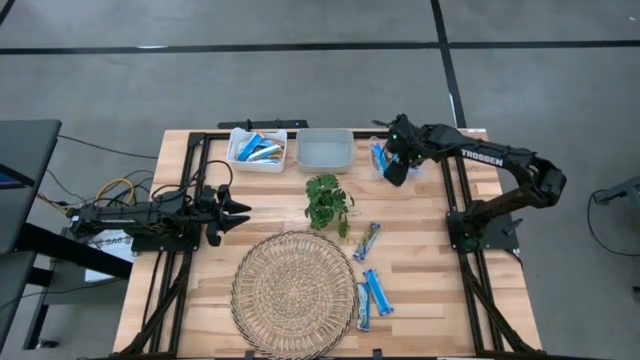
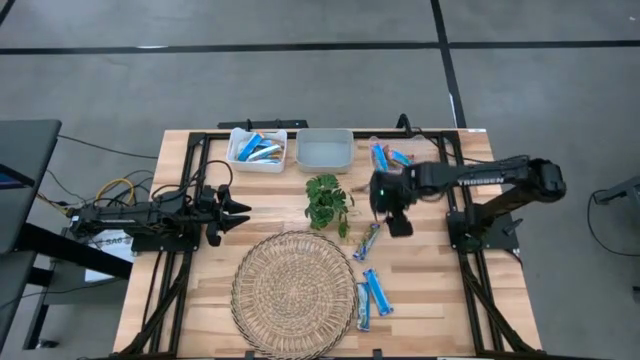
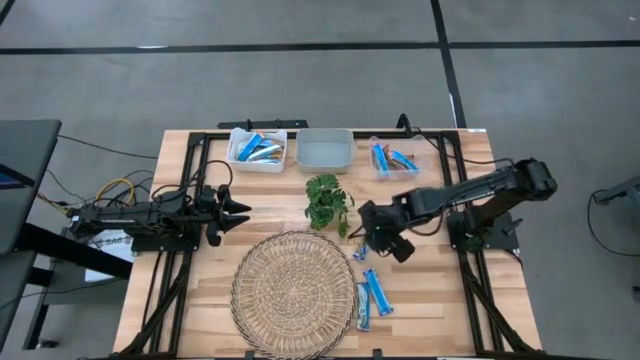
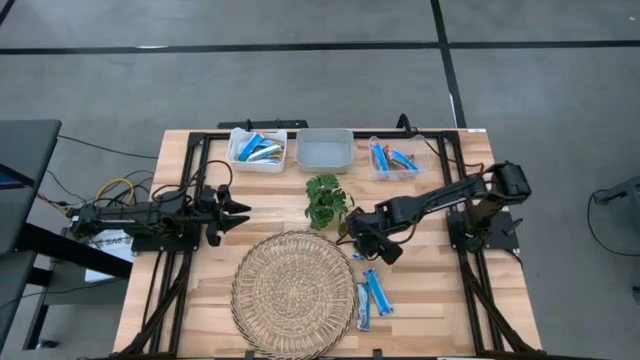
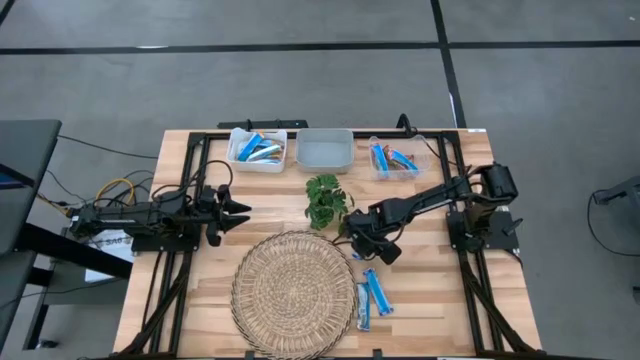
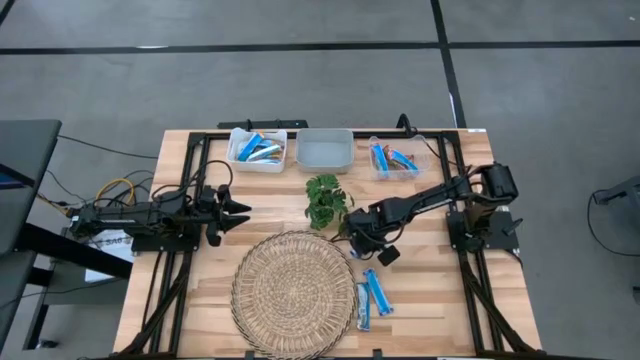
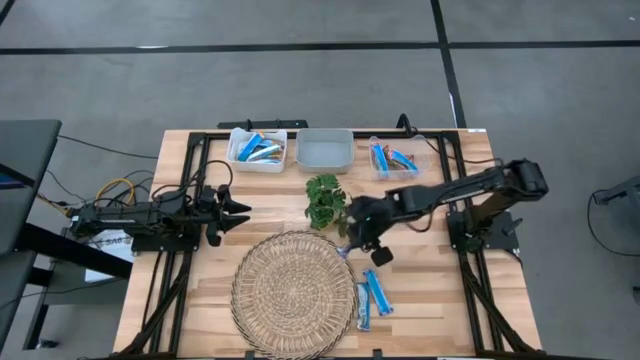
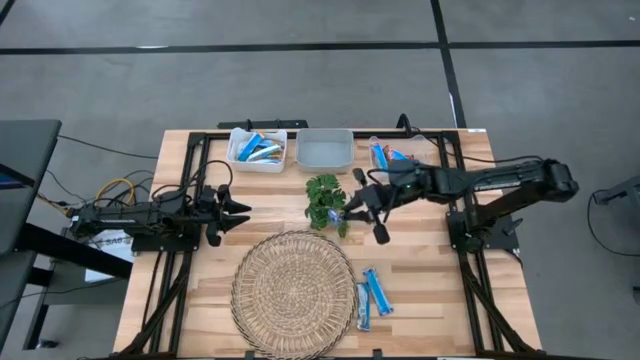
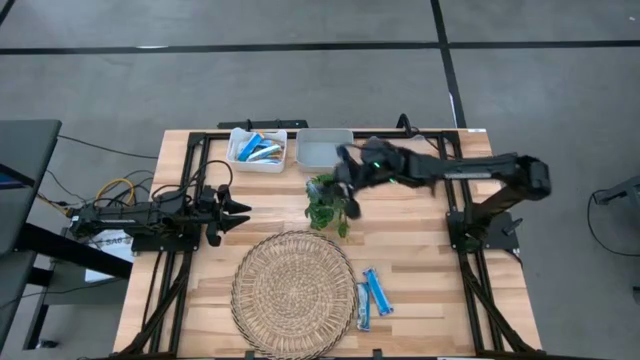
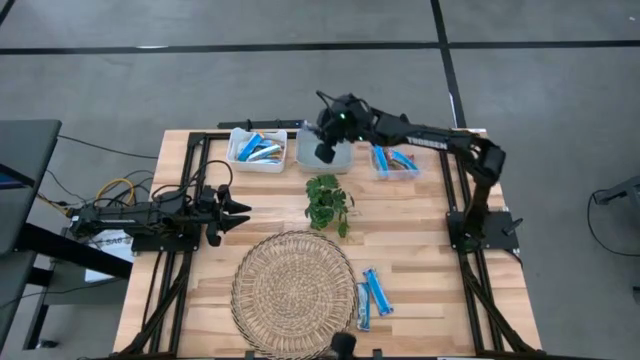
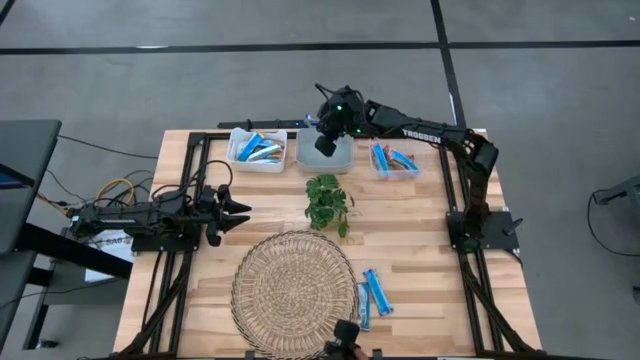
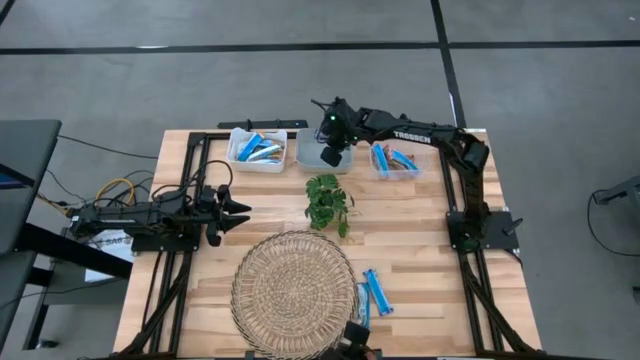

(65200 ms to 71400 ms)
Task: Pick and place Granola Bars by type
Put the blue granola bar into the gray bin

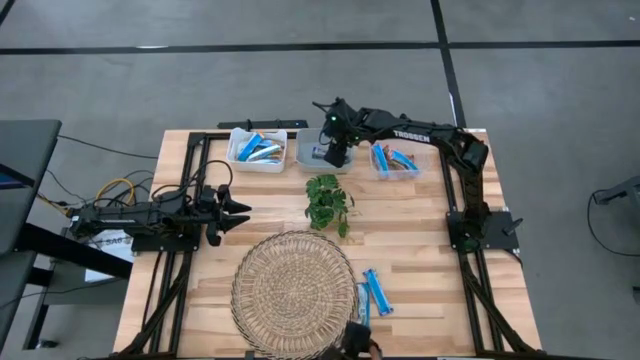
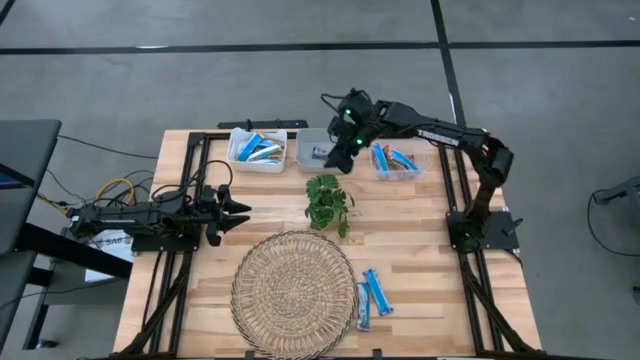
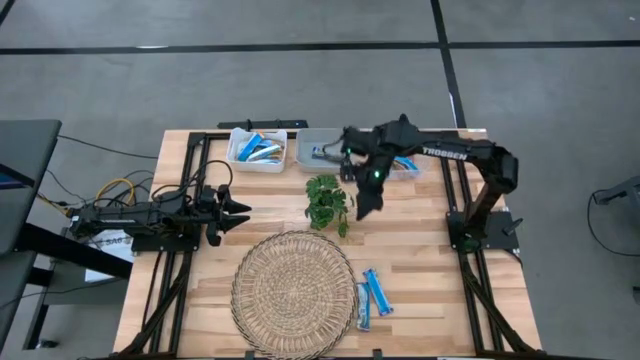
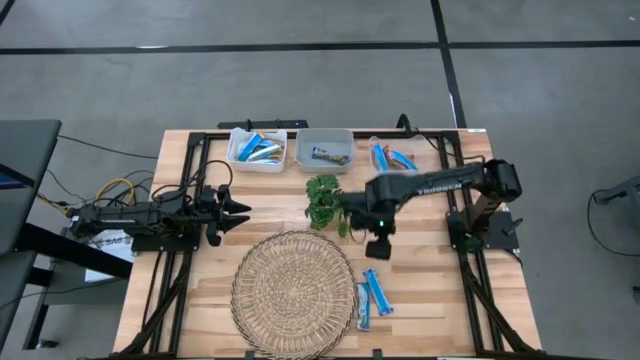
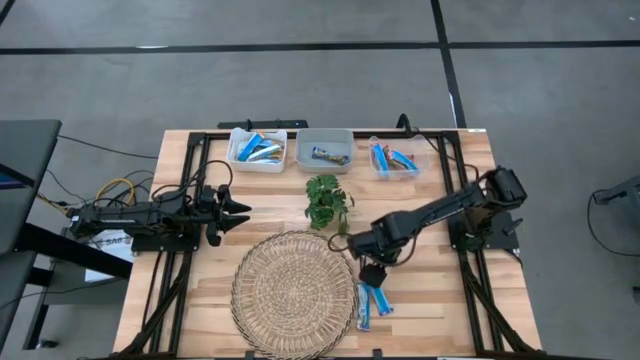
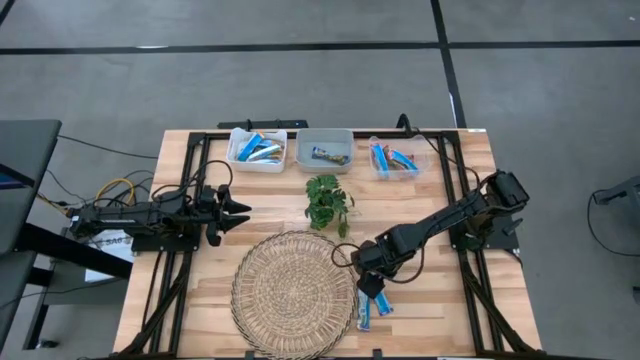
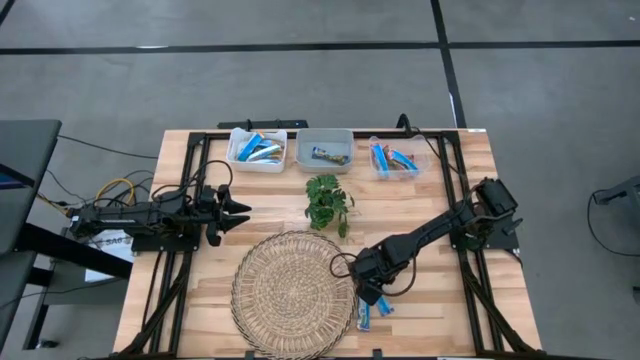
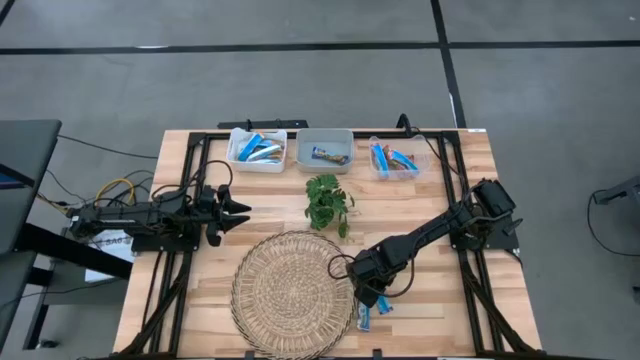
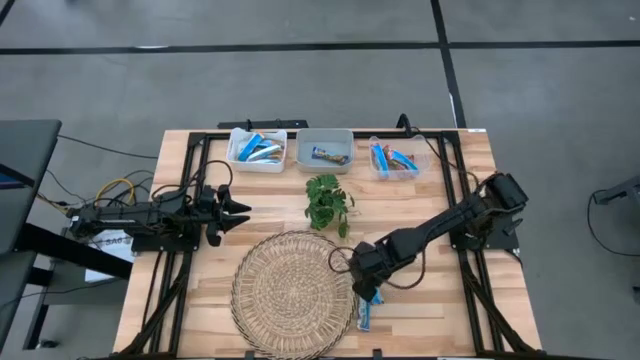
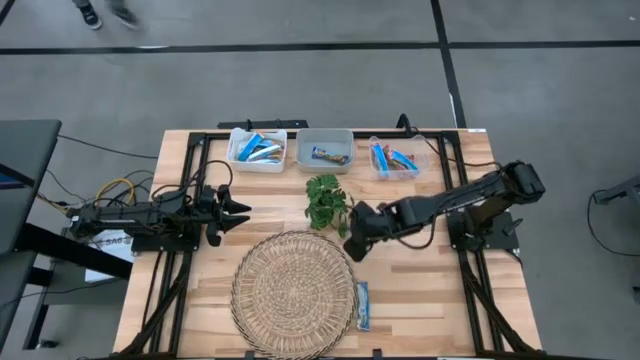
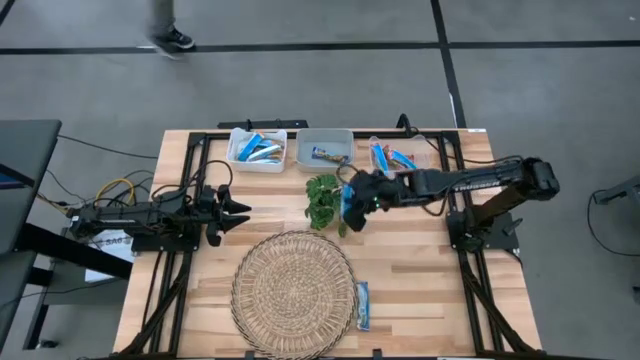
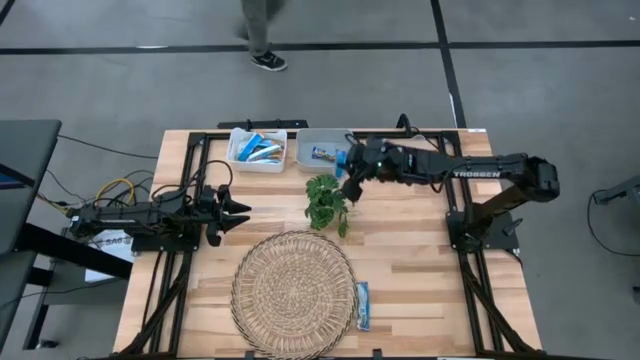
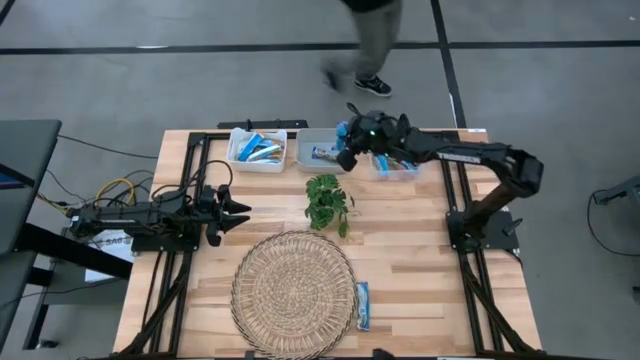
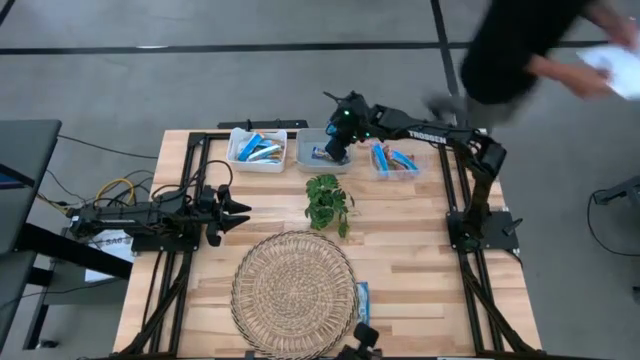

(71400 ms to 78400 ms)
Put the blue granola bar into the gray bin

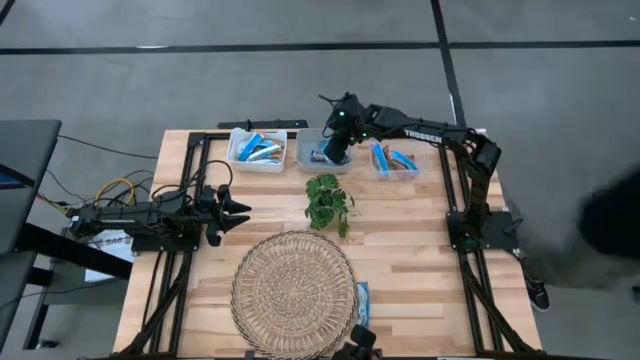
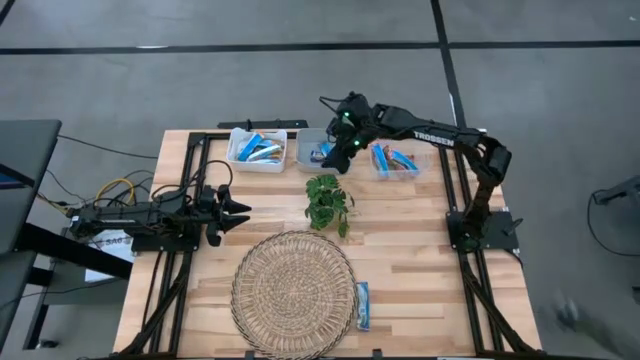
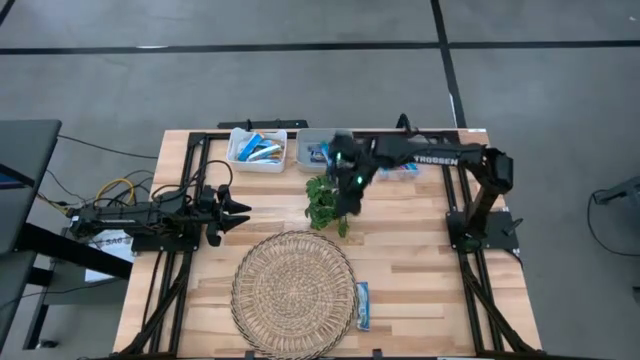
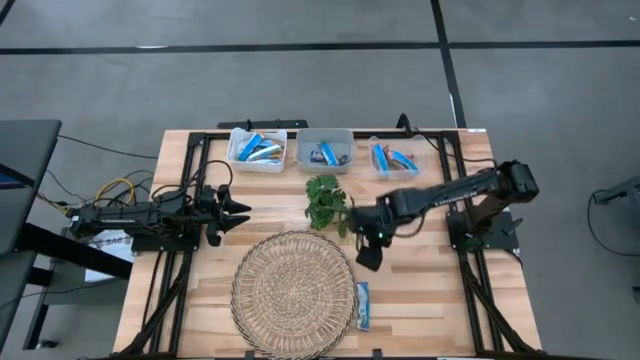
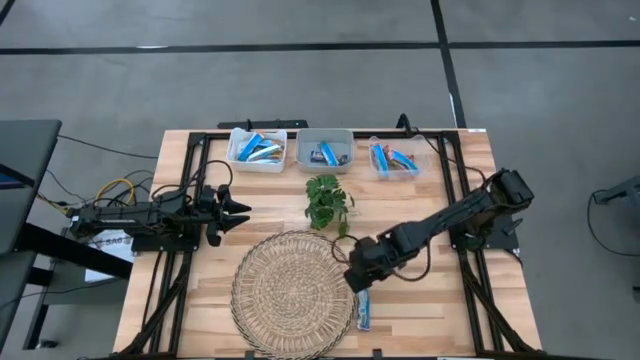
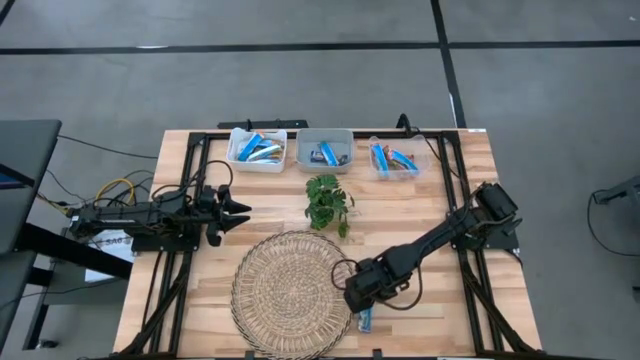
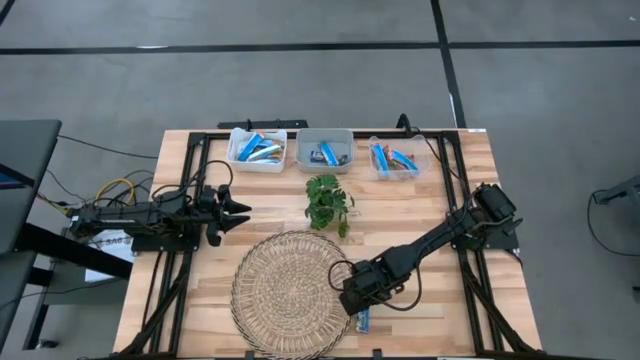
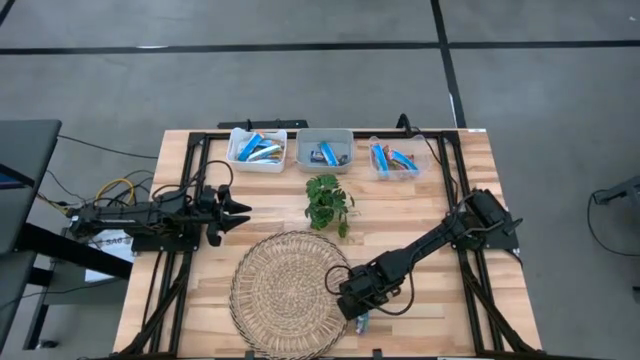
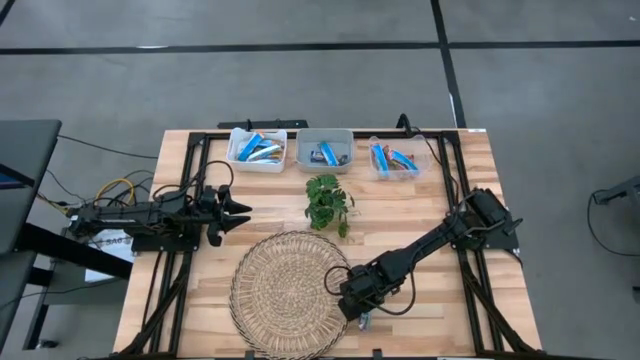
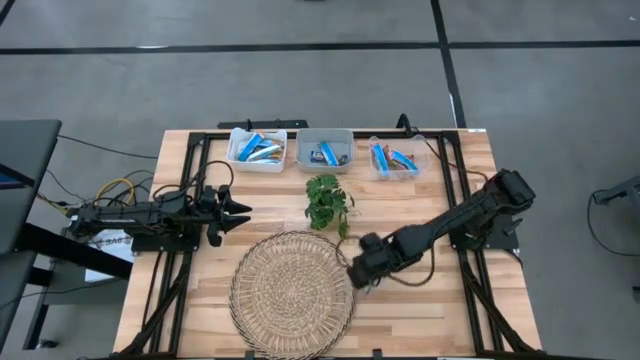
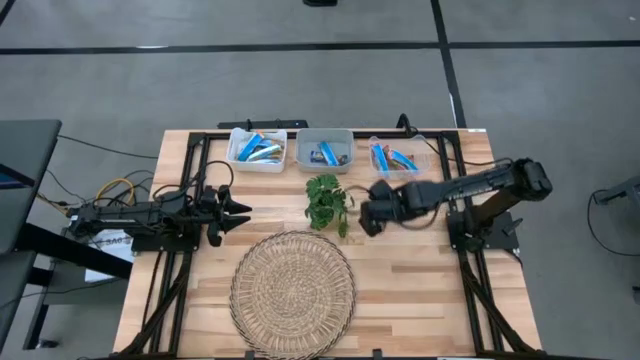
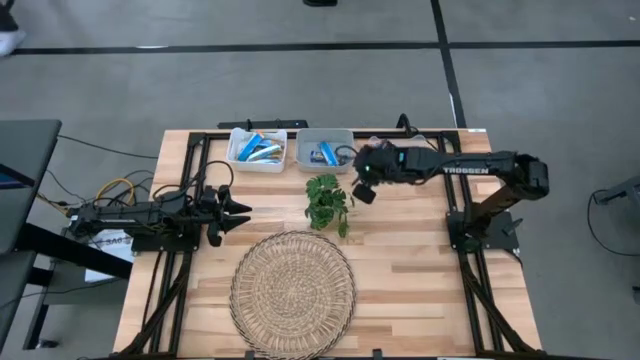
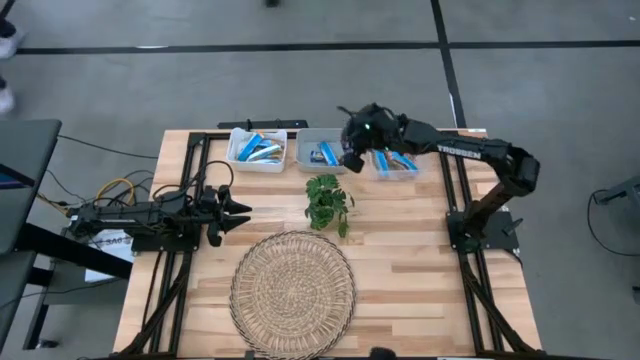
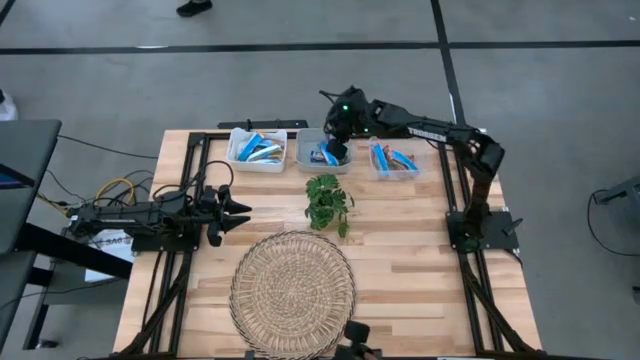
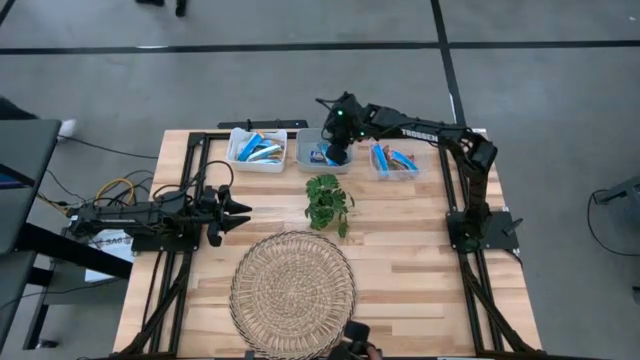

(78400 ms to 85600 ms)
Put the blue granola bar into the gray bin

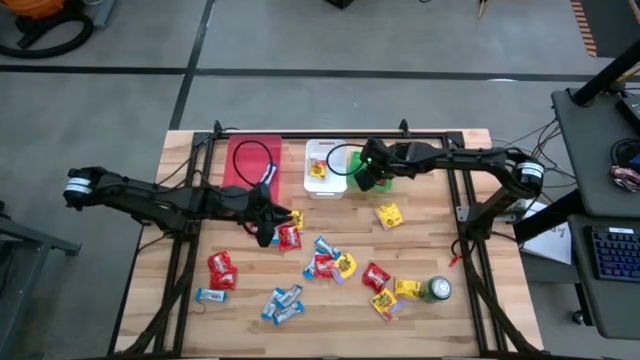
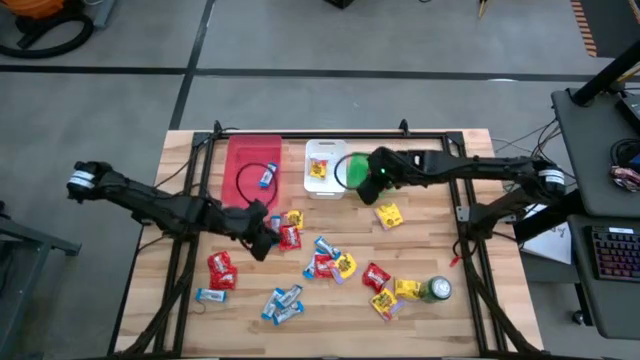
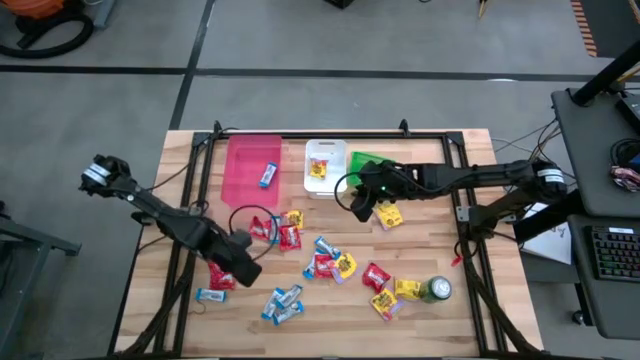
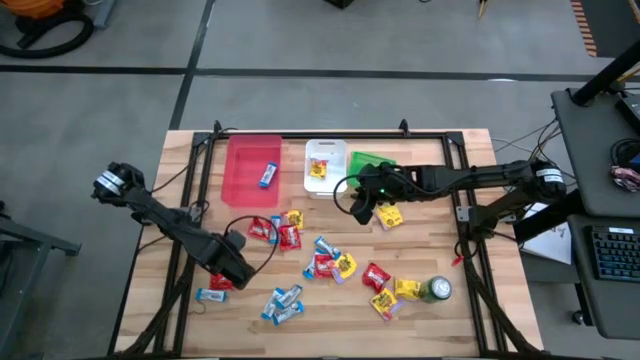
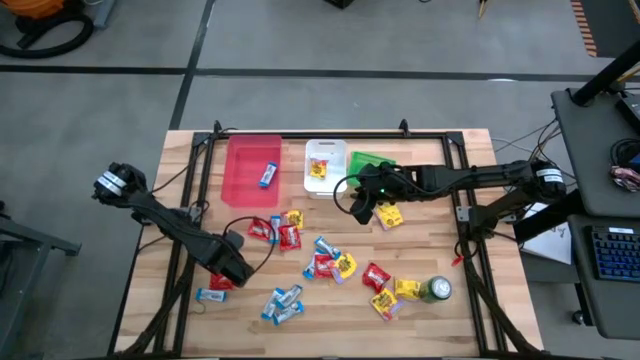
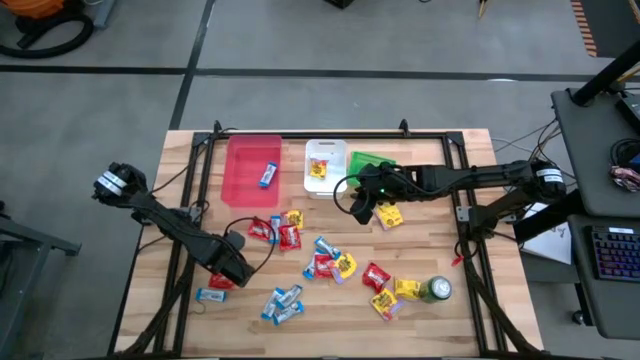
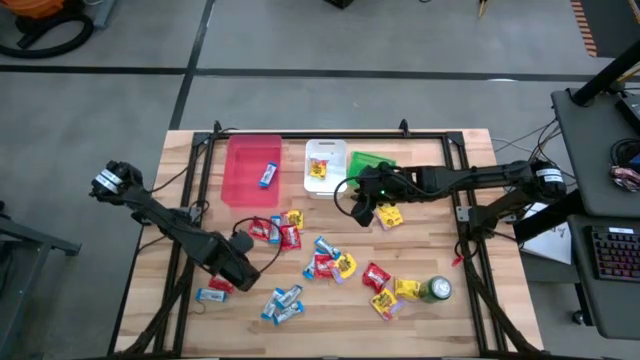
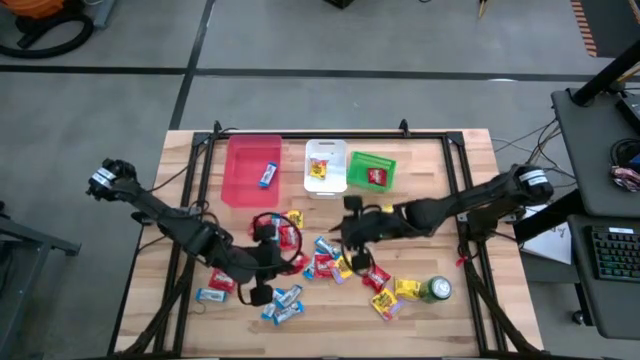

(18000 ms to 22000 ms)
Task: Sort candy
Put the red candy into the green bin
